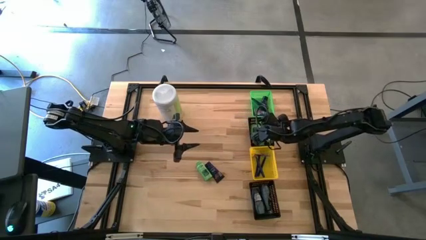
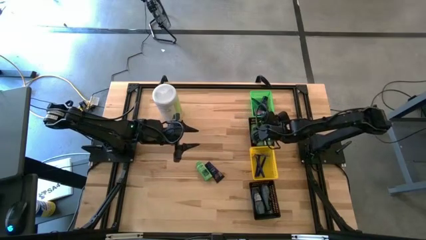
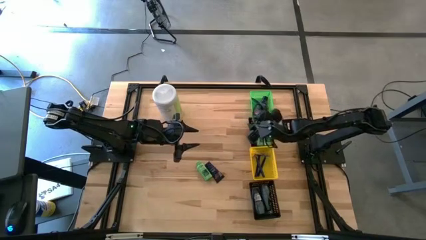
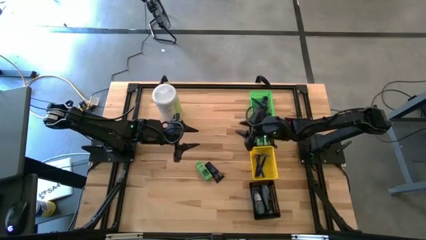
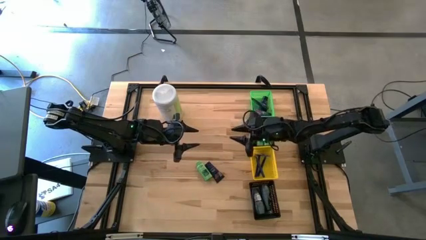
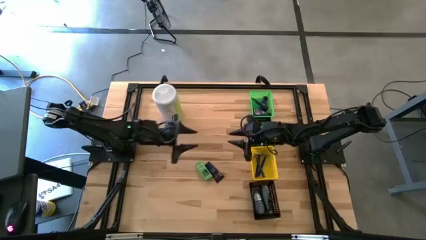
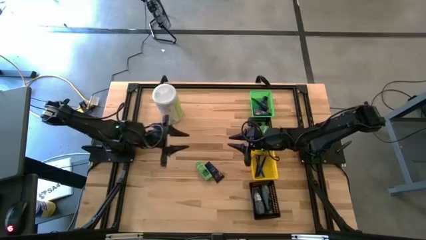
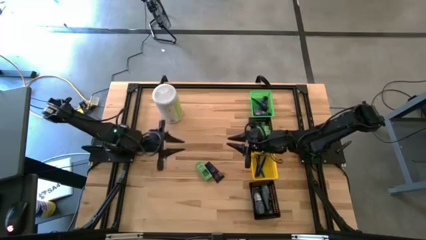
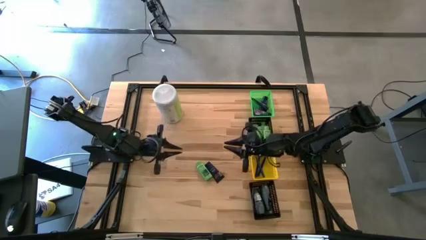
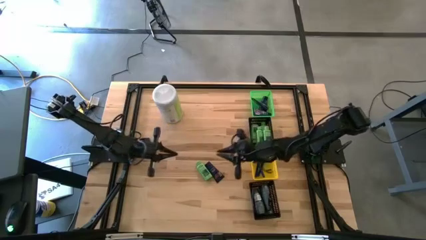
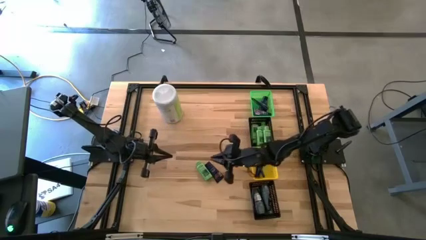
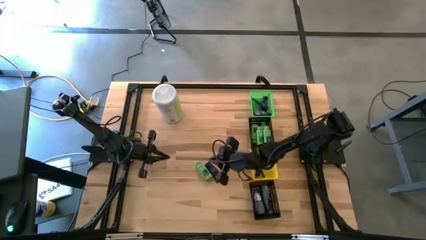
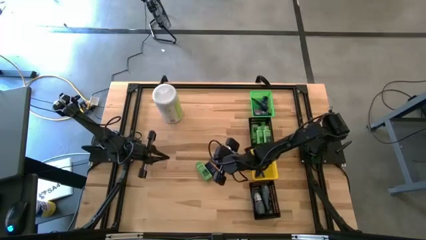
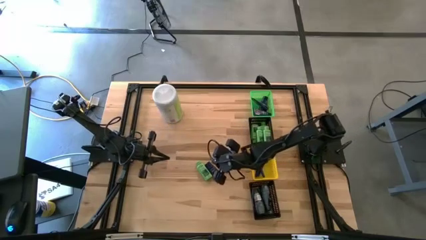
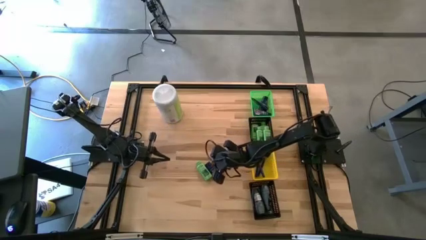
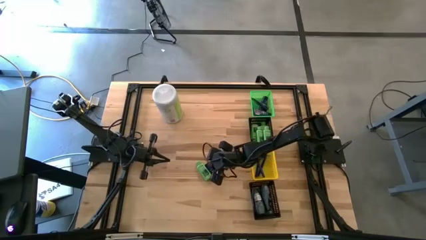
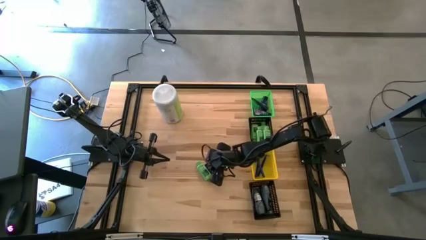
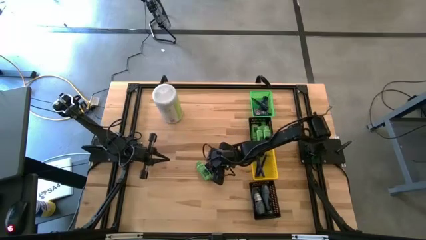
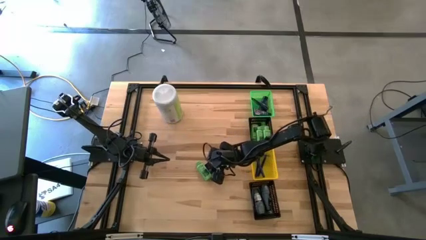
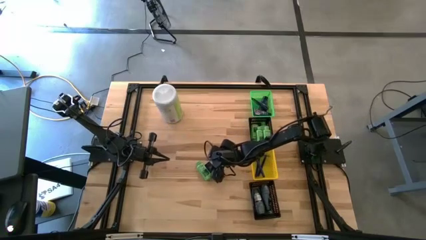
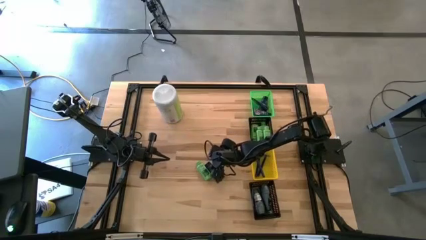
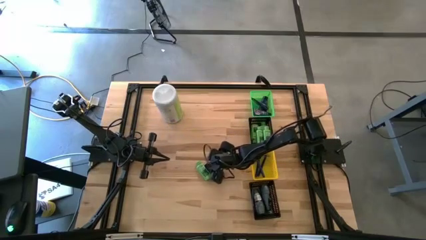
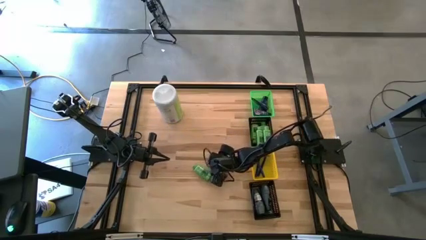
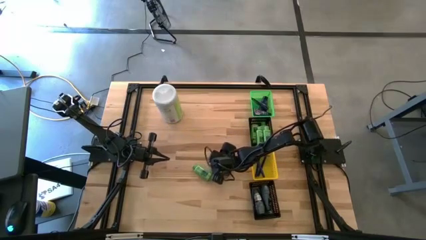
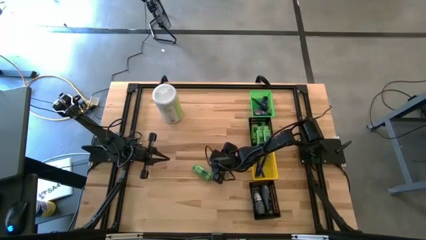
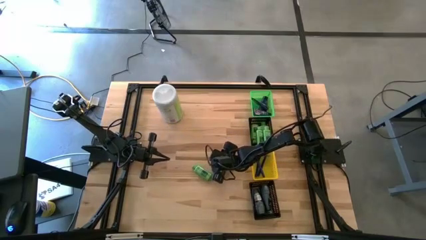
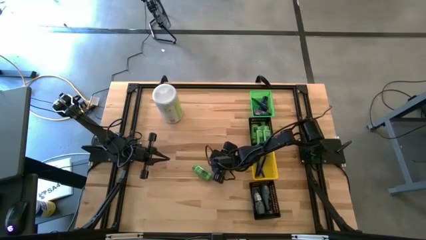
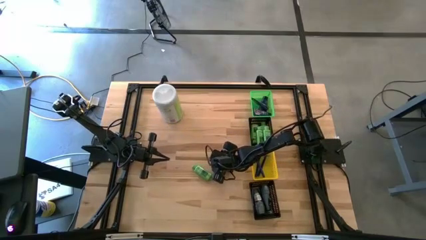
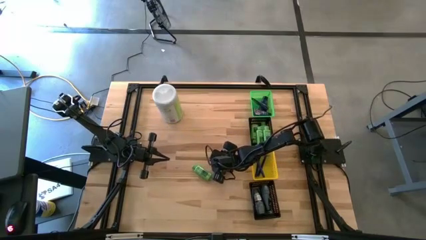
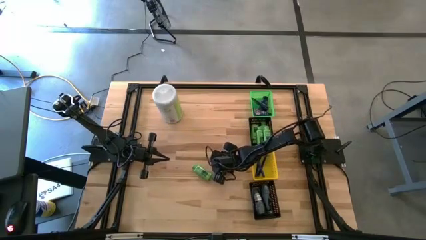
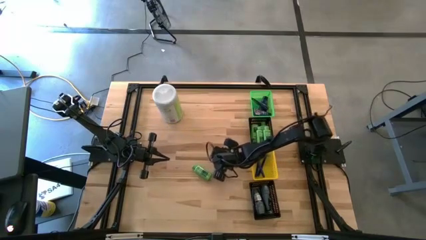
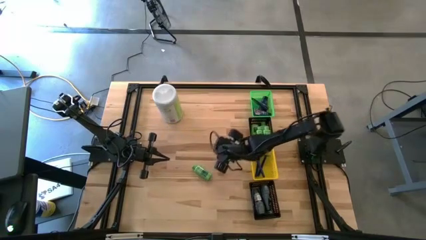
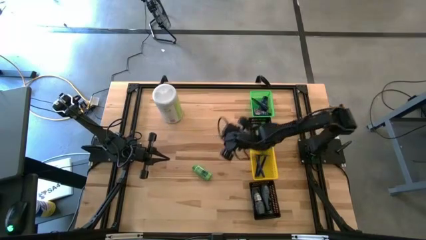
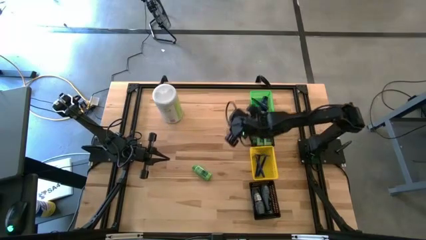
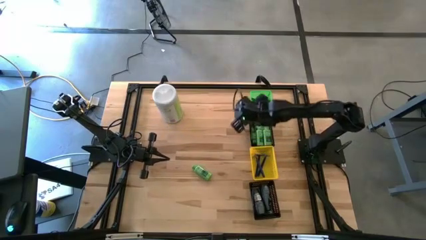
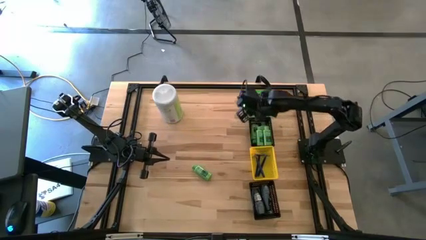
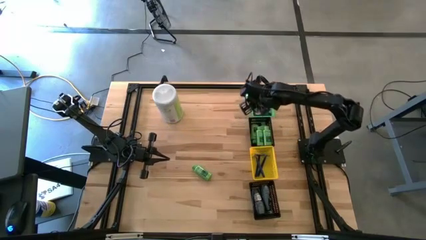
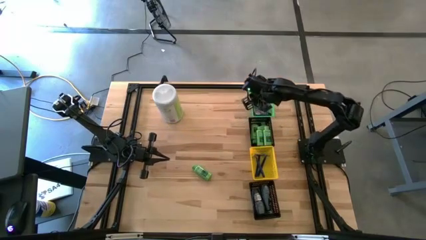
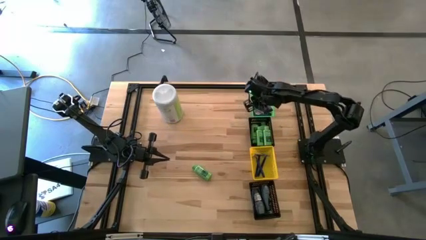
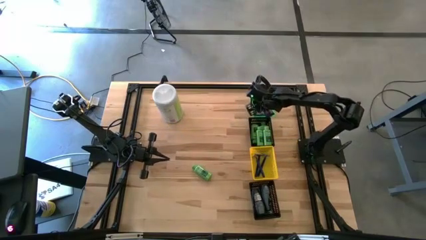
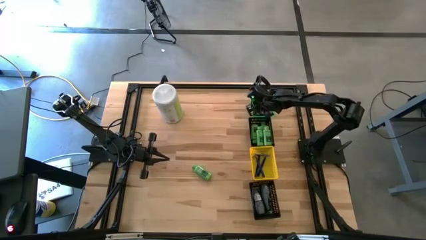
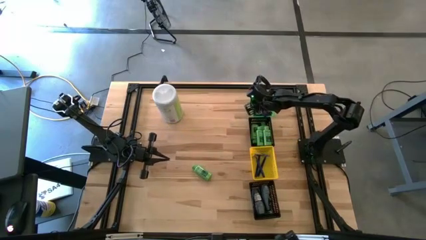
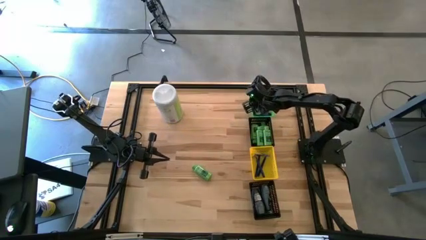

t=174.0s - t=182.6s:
Task: Pick & Place Travel size toiletries
Put the blue shave cream into the green basket

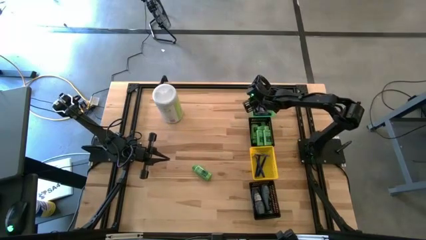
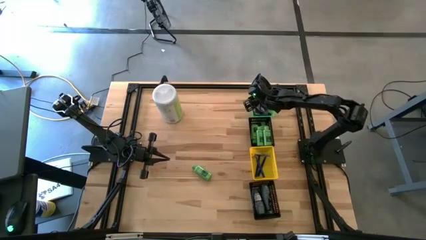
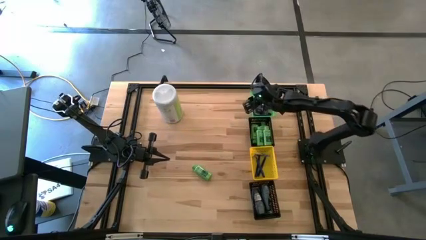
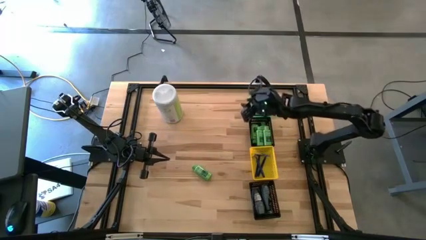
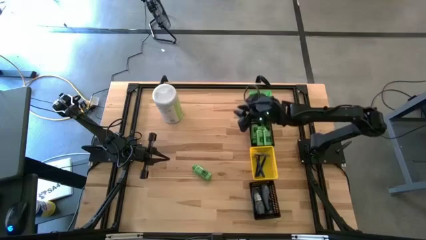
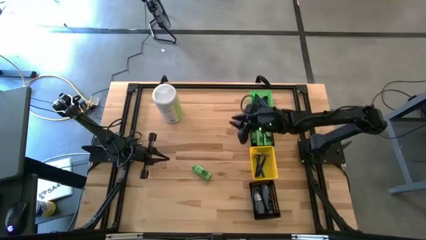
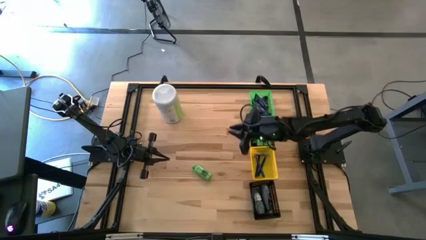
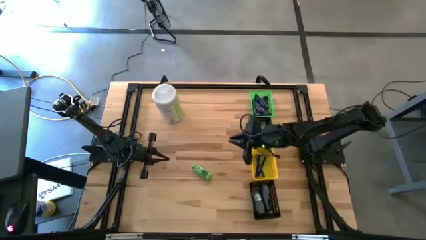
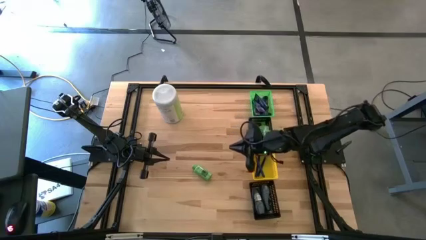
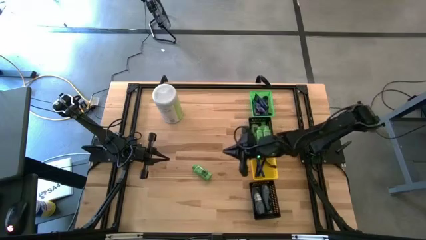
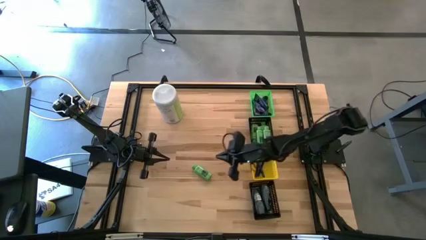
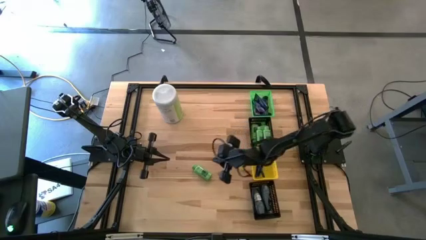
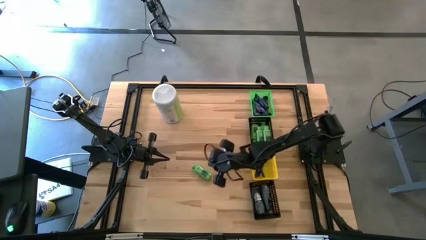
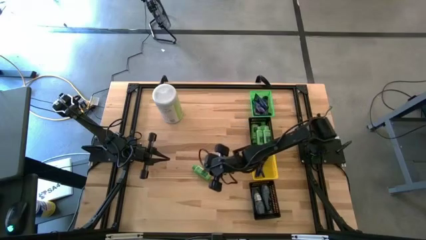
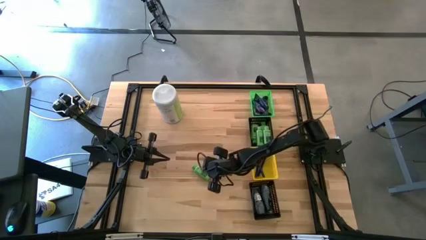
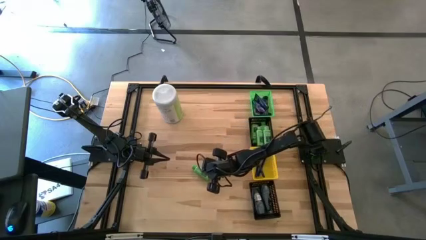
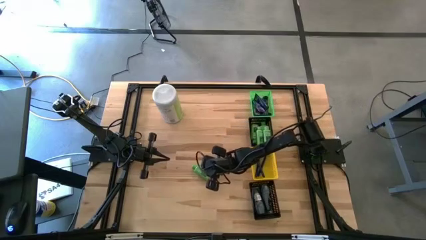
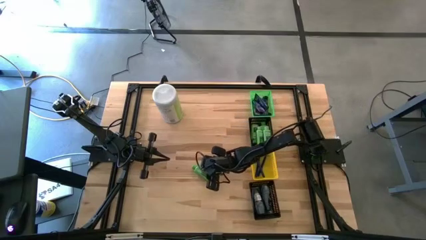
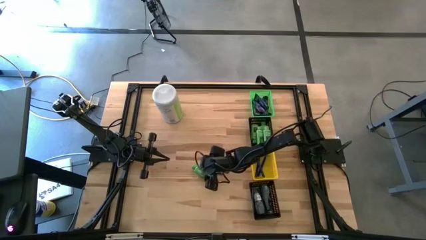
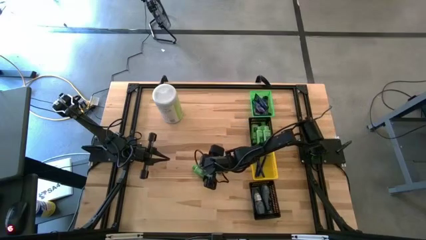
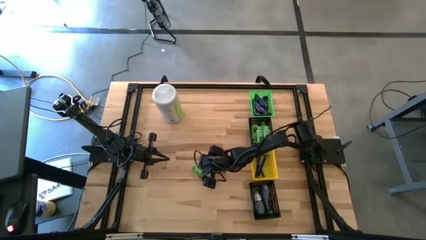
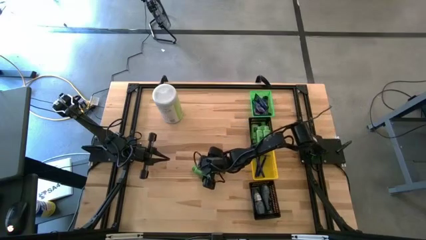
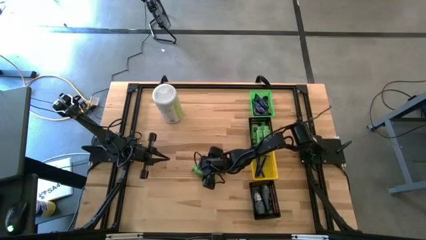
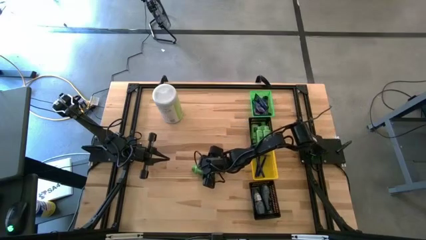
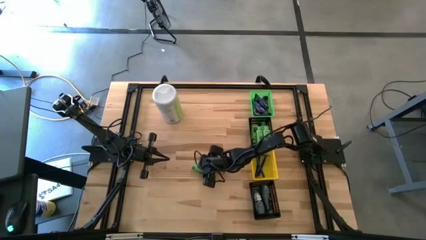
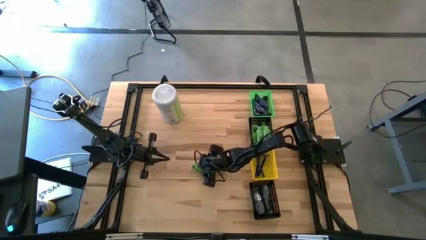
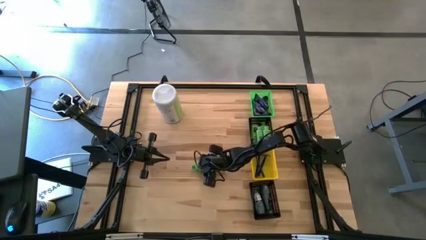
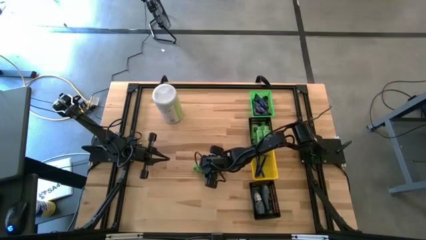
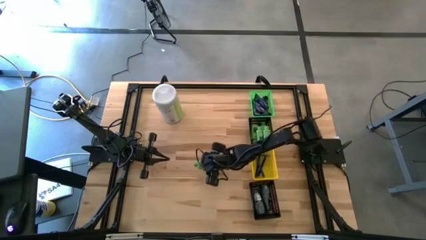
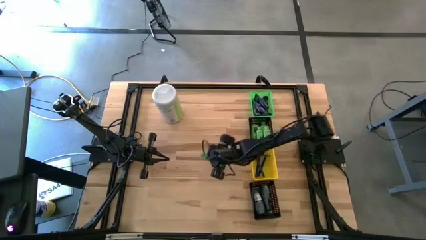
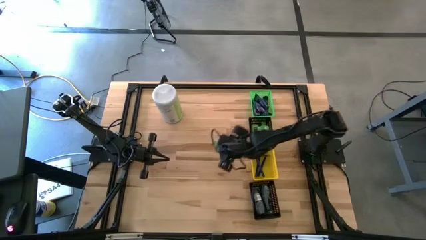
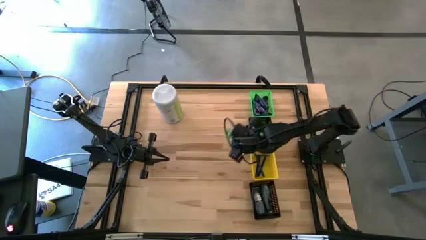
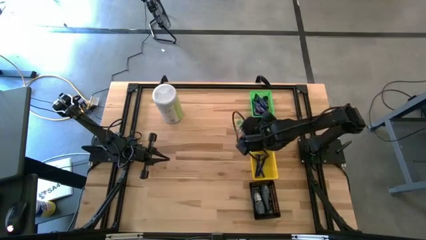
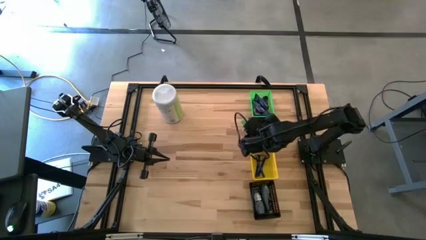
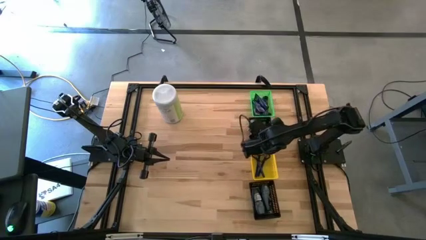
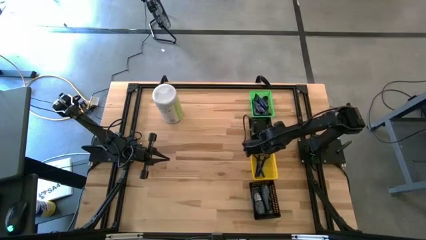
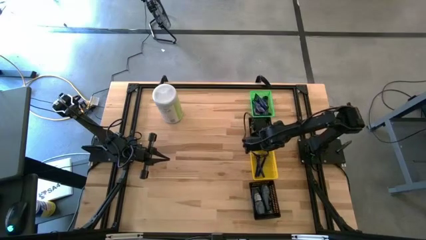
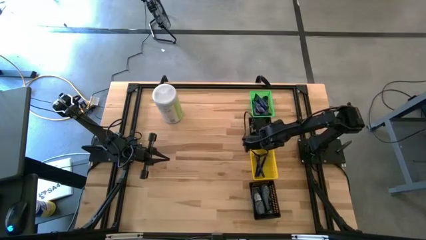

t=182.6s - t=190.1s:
Put the green shampoo into the top black basket
